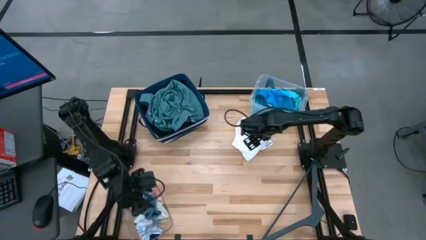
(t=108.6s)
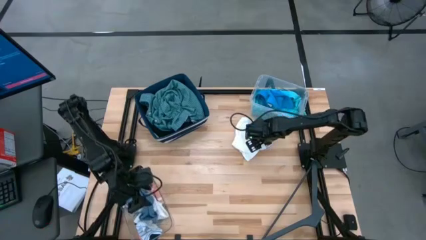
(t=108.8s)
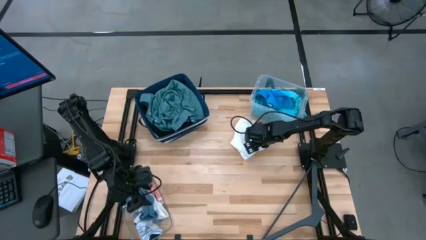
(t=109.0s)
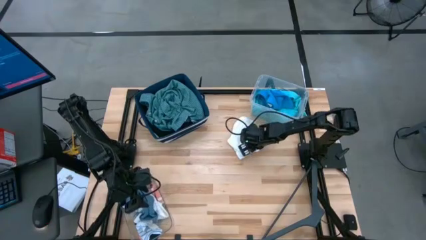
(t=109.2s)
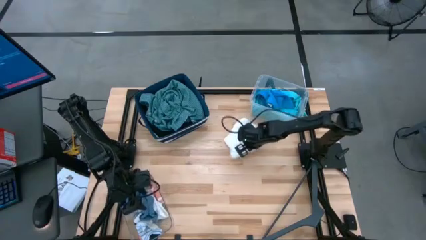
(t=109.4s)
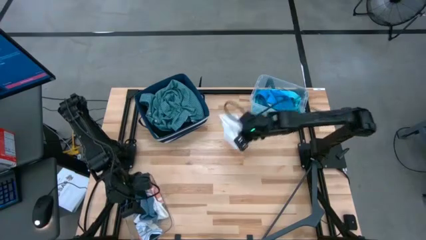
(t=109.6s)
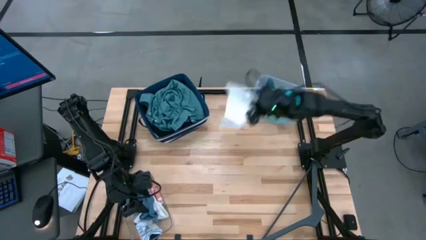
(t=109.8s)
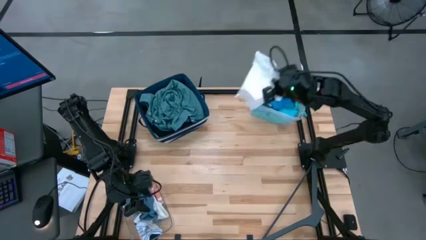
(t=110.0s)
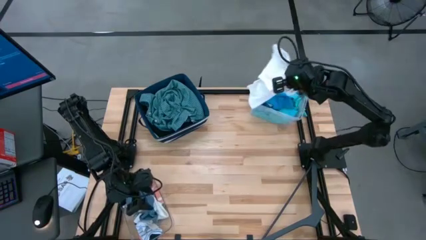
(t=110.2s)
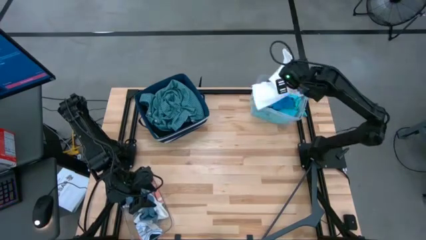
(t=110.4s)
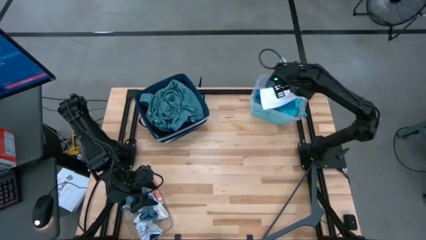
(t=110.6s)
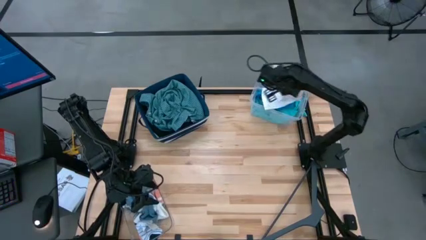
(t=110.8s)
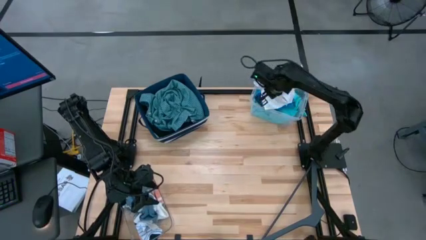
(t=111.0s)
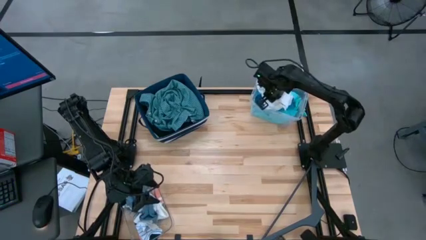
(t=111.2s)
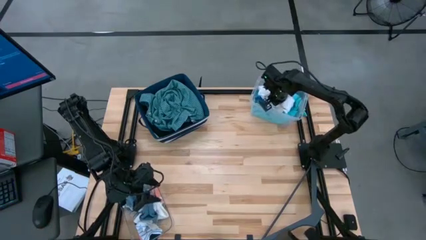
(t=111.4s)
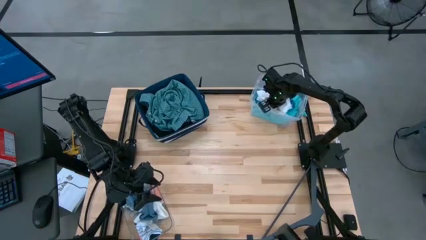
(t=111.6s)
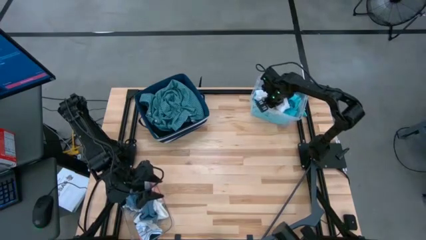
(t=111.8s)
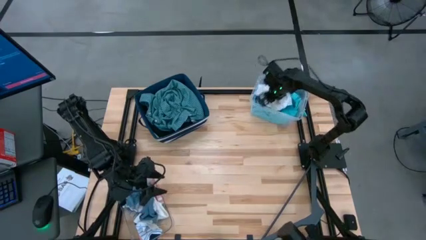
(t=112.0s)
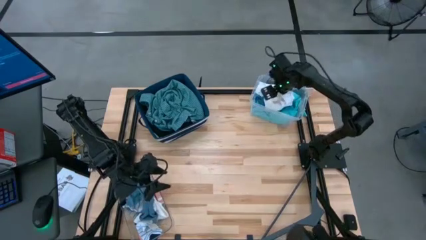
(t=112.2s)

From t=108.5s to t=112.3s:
Task: Pick & Place Cloths
Put the white shorts into the white bin

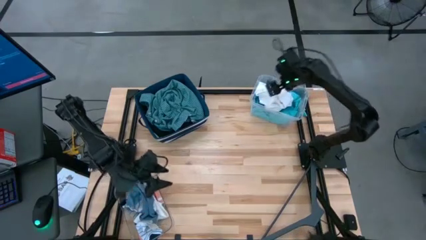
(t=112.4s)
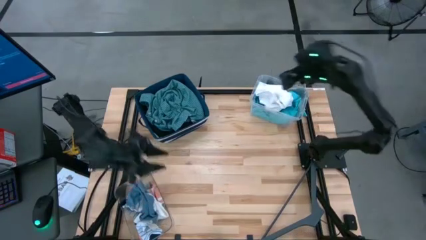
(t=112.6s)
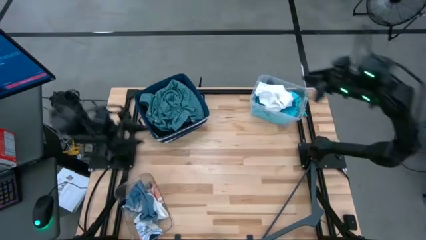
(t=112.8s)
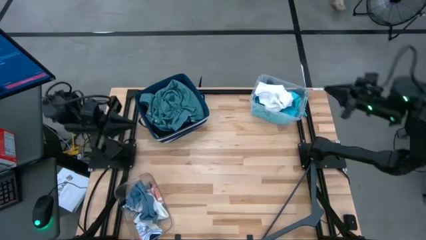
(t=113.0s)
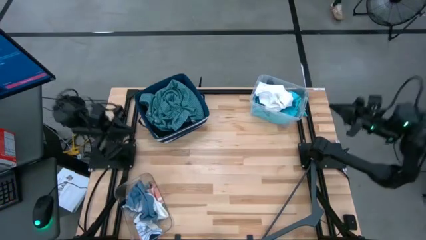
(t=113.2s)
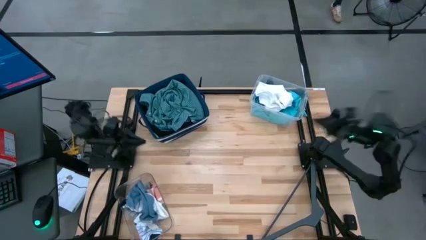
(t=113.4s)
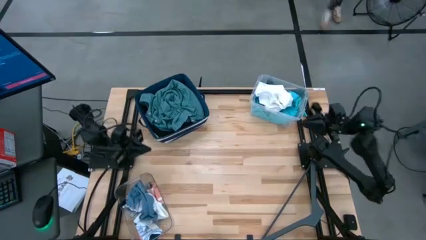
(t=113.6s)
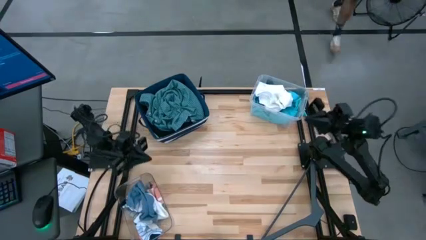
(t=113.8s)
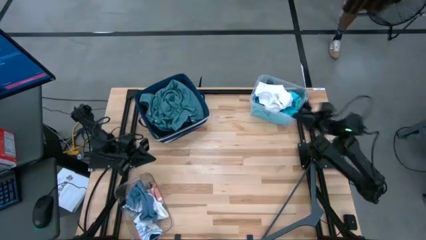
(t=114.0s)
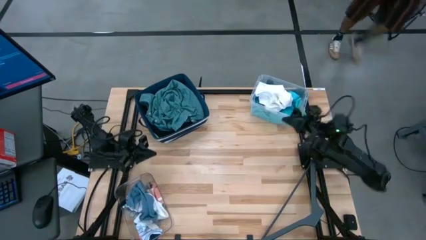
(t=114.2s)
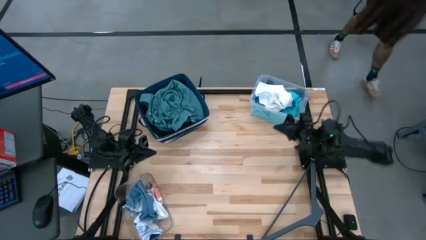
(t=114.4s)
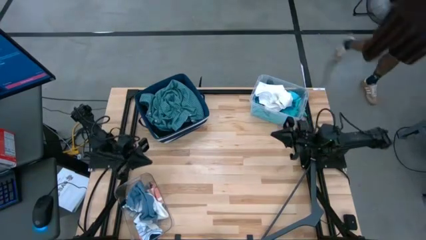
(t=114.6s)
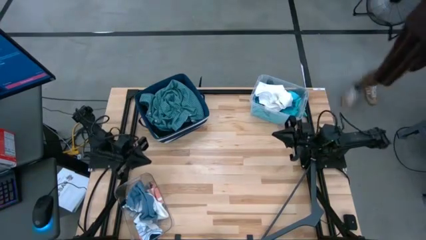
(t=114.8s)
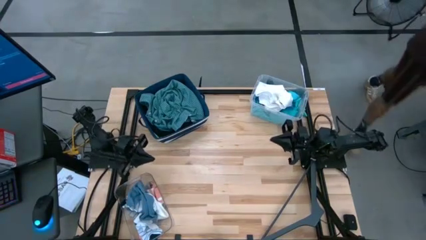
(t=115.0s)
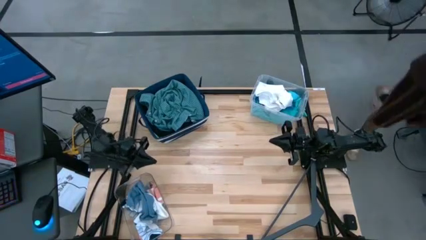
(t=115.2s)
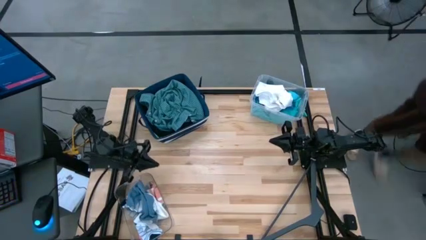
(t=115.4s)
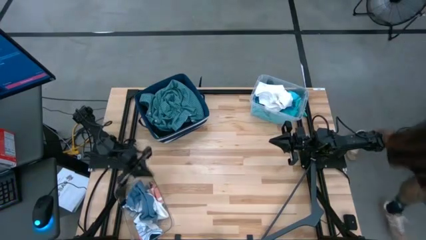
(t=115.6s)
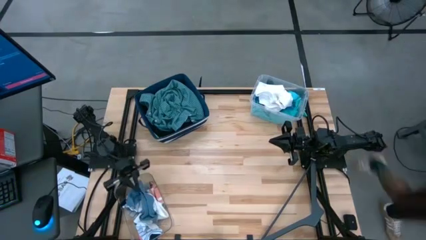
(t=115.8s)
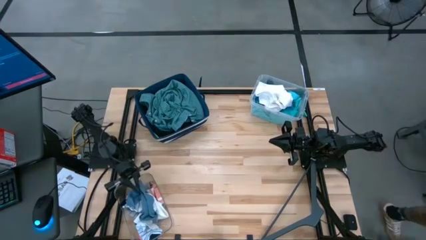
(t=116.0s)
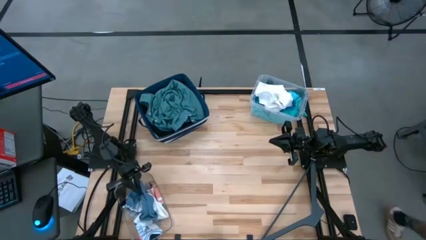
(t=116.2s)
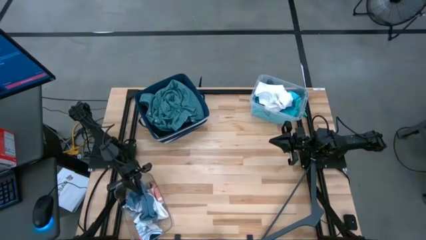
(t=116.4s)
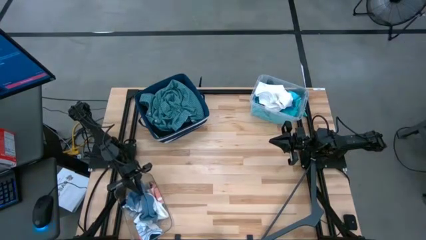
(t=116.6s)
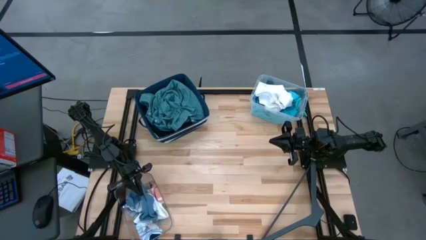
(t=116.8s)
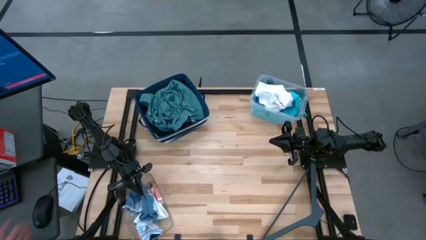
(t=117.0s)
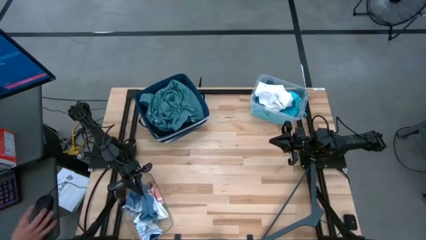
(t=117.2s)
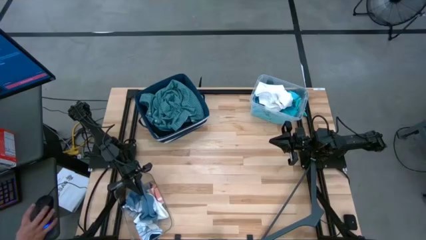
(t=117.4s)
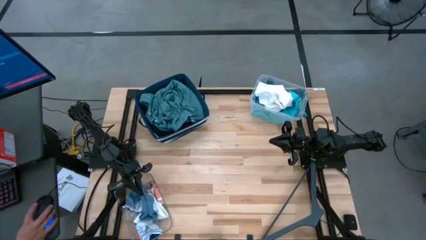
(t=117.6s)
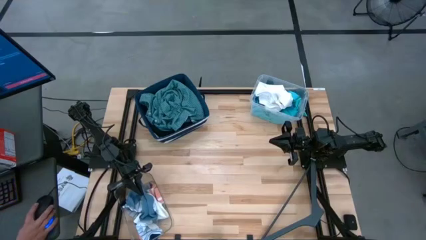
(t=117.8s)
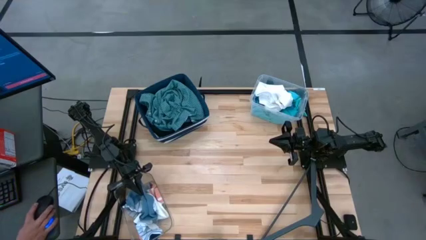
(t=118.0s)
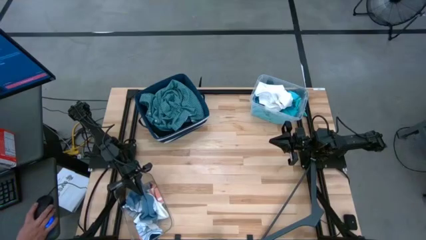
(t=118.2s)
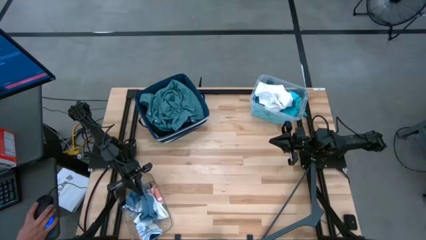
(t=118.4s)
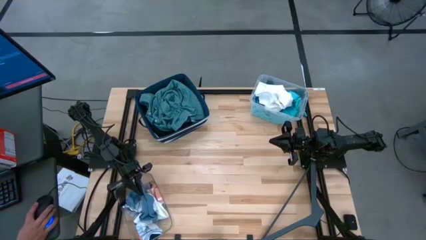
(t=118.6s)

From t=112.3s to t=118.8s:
Return to Home Position

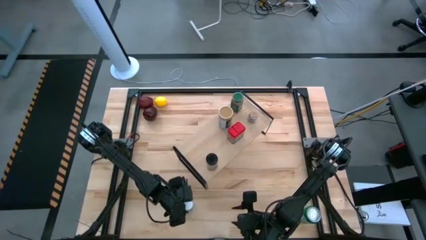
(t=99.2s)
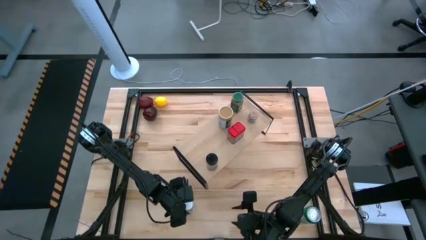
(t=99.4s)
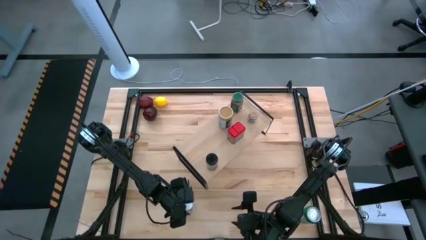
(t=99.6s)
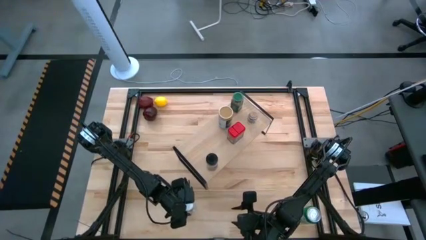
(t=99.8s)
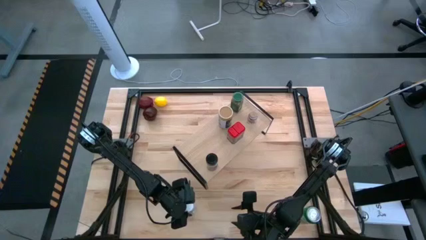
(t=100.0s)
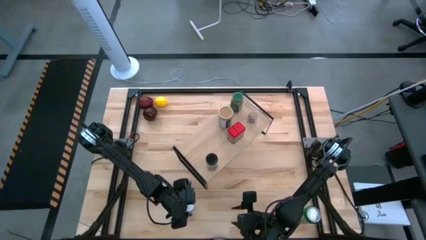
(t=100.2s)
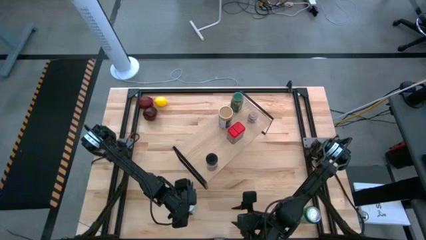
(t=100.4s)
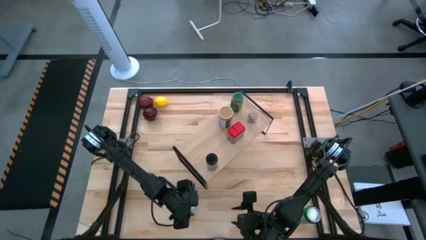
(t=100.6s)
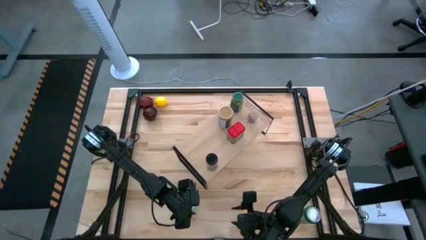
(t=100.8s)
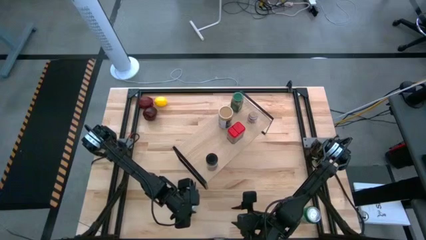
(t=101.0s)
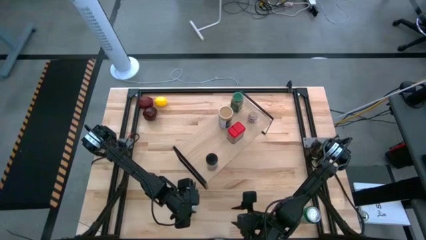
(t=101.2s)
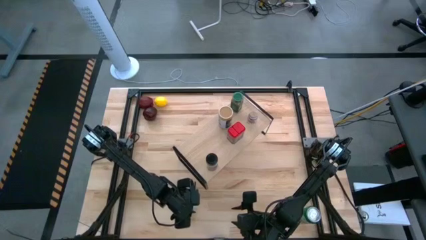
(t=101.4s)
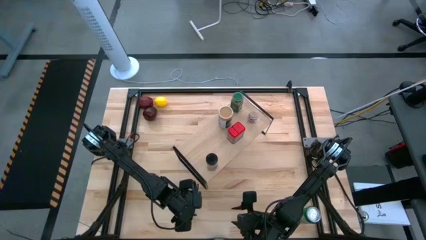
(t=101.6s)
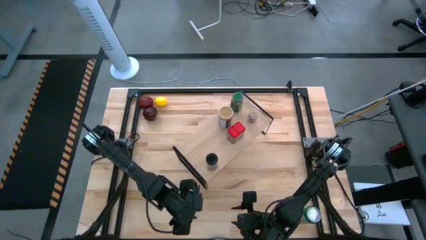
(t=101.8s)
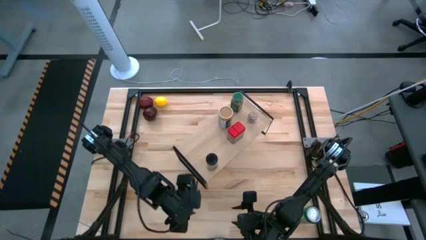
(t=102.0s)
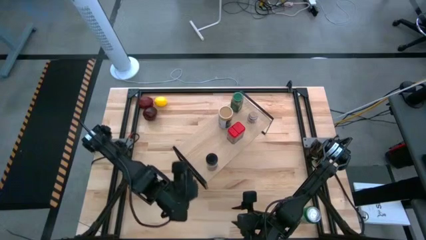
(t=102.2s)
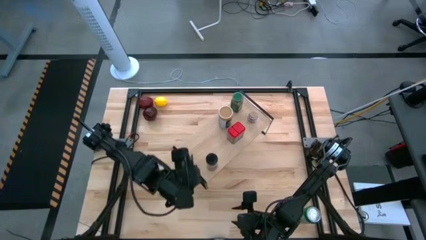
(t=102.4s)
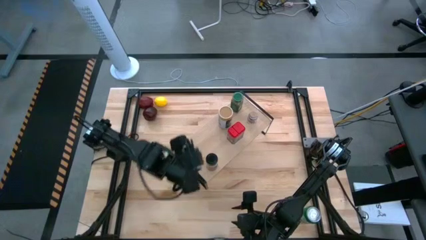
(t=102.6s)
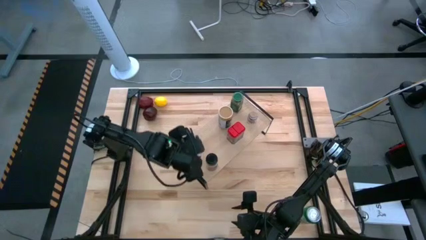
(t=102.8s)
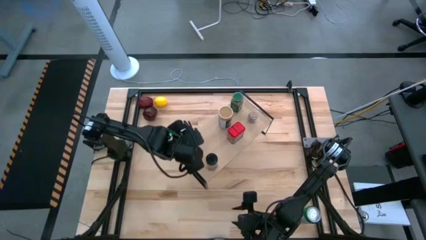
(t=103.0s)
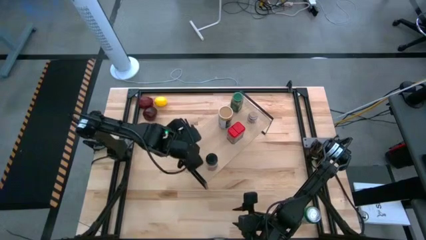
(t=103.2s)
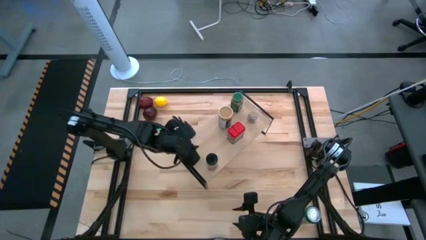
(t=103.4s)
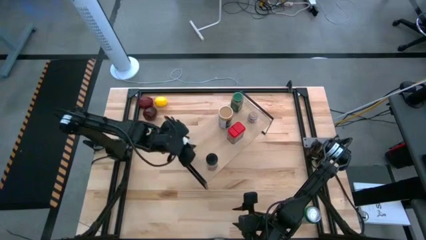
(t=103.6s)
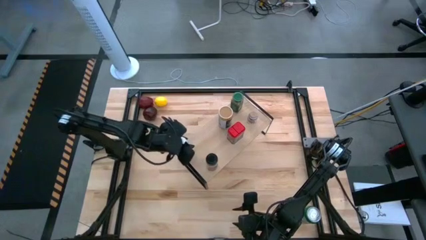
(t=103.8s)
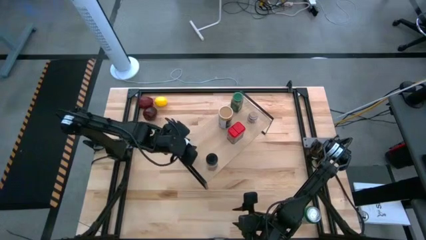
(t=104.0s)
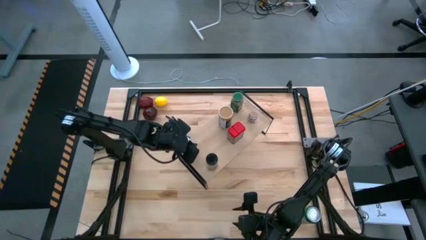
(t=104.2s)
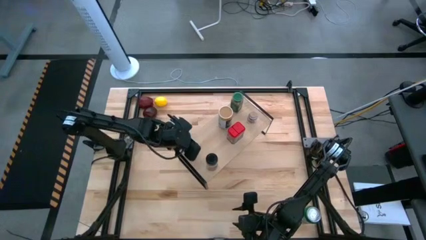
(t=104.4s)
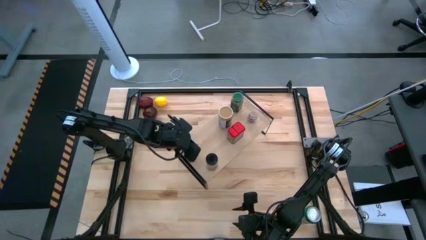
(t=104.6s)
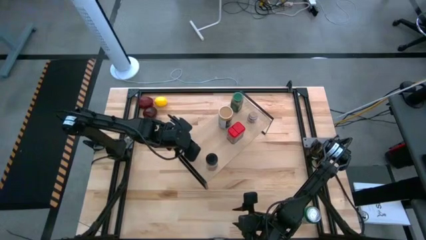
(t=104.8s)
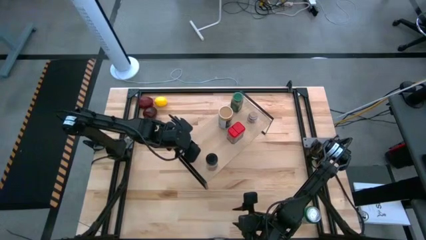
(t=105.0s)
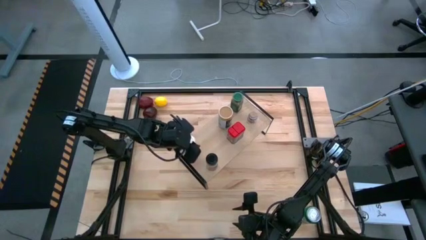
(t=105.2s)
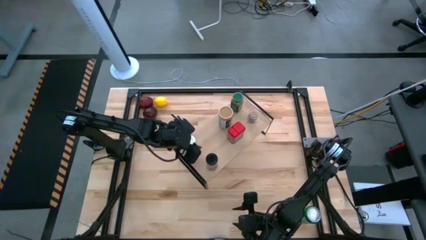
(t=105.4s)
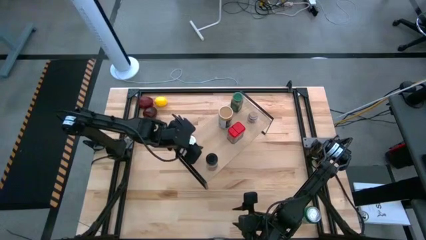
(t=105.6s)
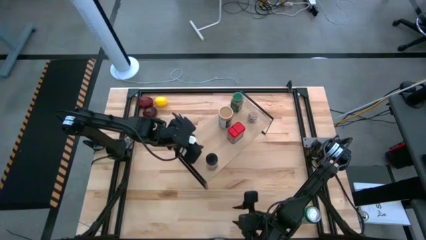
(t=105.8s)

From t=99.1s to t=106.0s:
Task: Shelf spices
Put the white seasoning bottle on the shelf

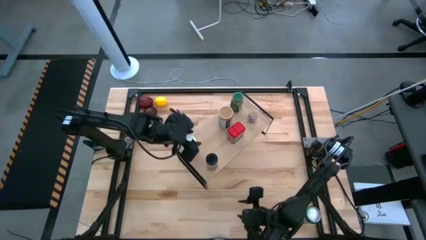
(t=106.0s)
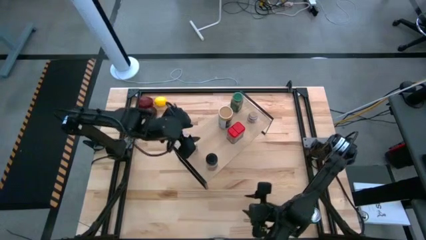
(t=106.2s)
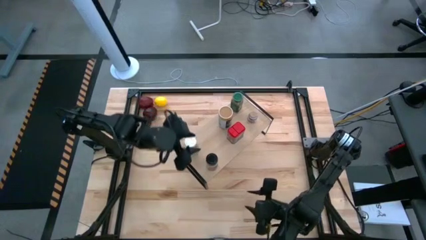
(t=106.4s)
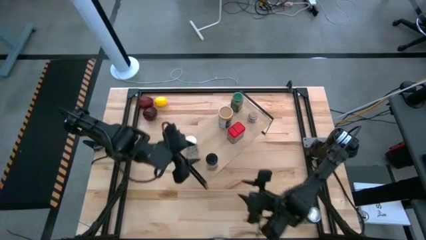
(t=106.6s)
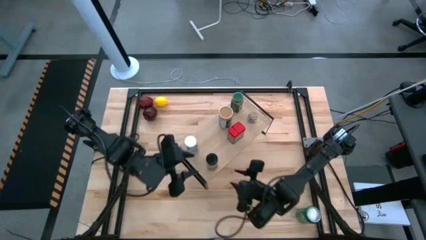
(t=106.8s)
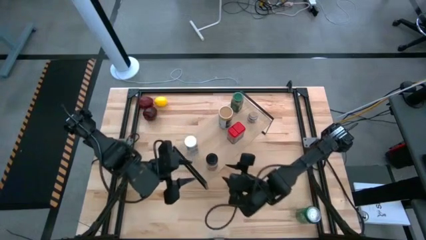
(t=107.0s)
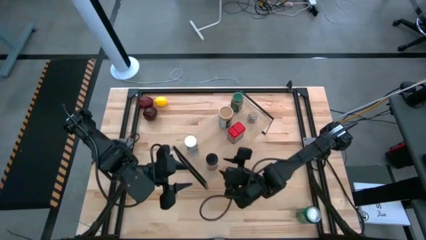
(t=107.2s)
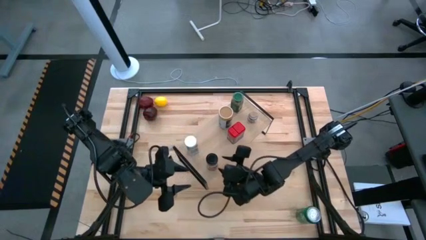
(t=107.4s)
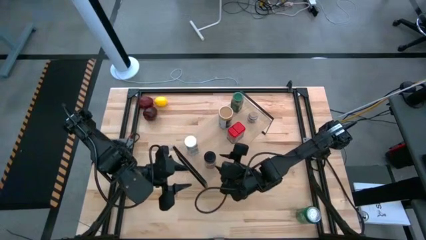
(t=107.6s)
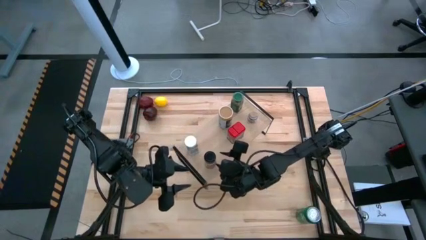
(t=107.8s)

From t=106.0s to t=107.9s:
Adjust the black seasoning bottle on the shelf
